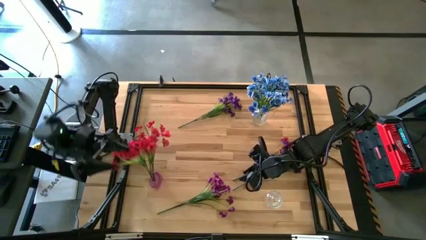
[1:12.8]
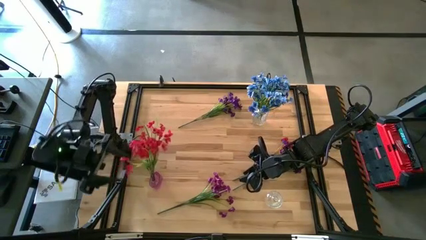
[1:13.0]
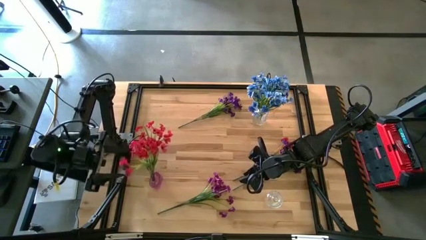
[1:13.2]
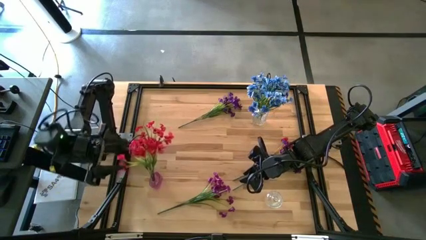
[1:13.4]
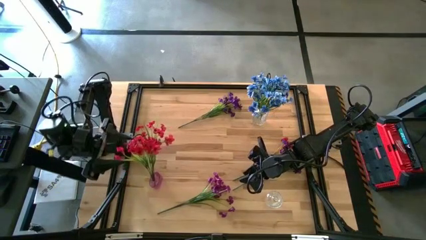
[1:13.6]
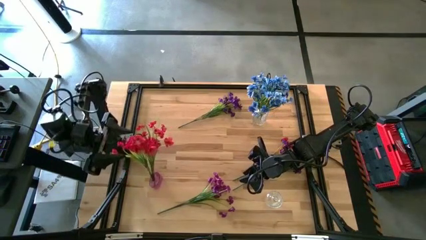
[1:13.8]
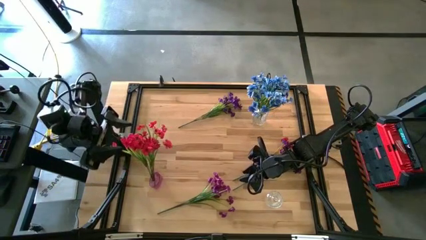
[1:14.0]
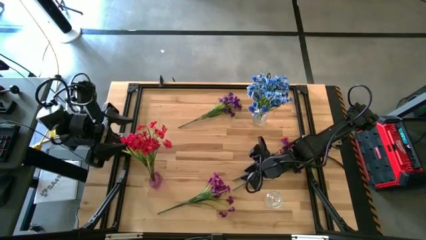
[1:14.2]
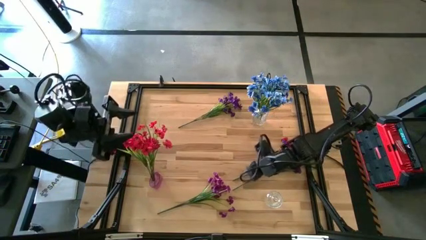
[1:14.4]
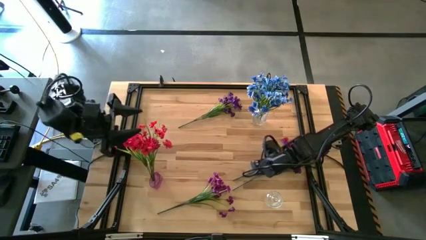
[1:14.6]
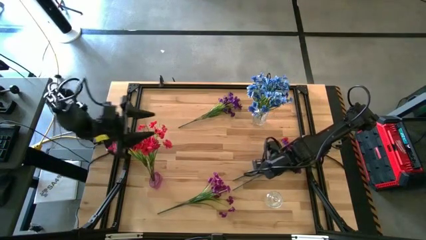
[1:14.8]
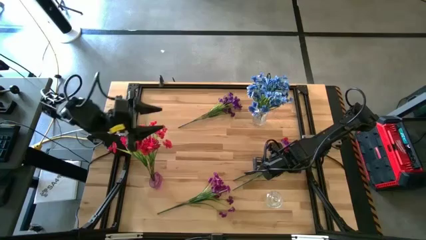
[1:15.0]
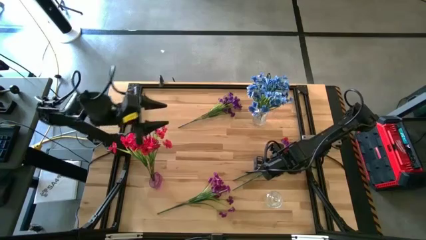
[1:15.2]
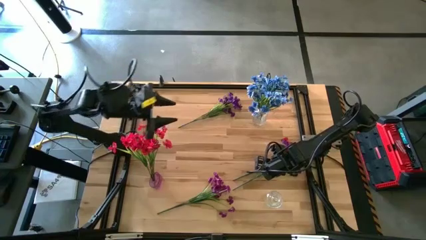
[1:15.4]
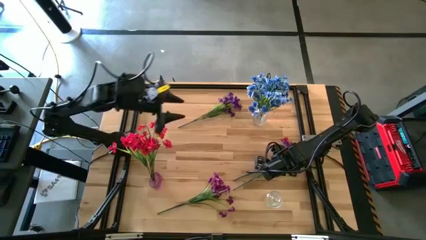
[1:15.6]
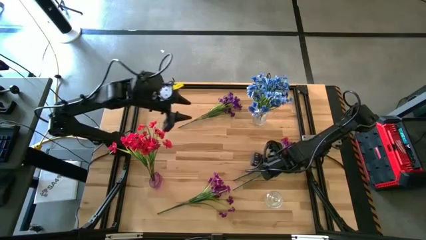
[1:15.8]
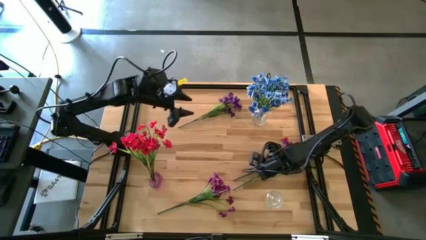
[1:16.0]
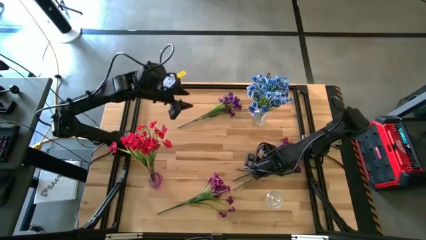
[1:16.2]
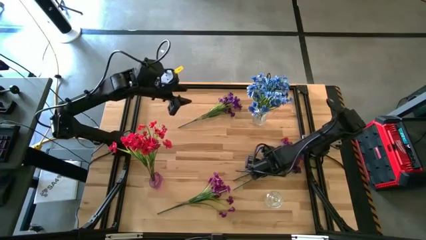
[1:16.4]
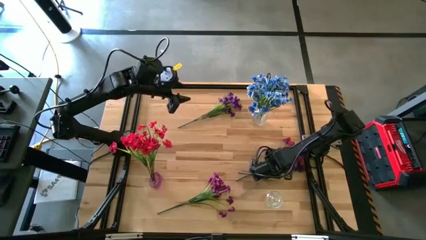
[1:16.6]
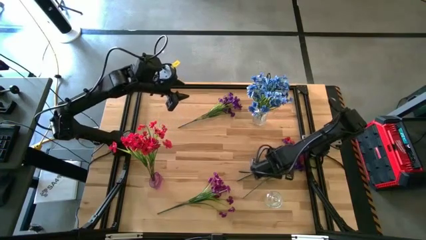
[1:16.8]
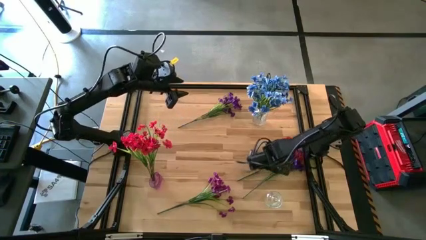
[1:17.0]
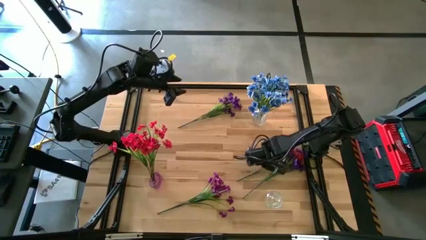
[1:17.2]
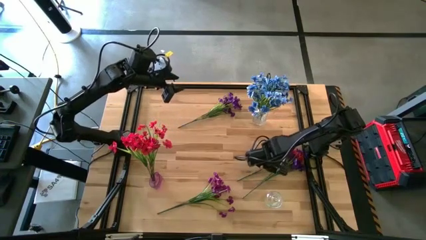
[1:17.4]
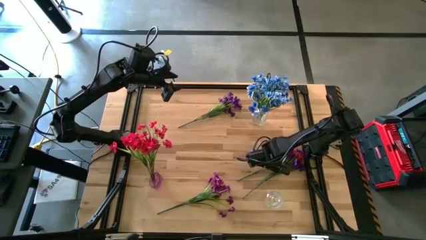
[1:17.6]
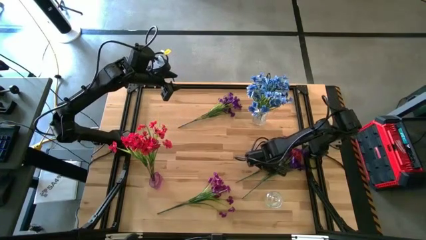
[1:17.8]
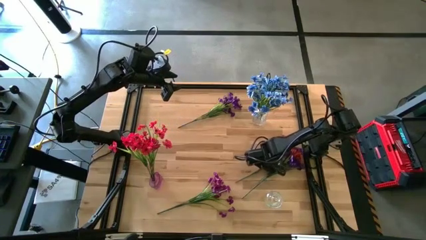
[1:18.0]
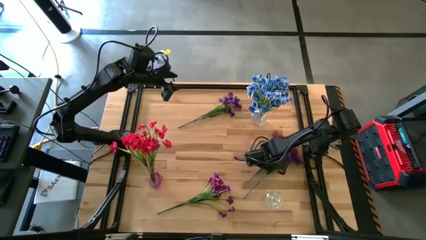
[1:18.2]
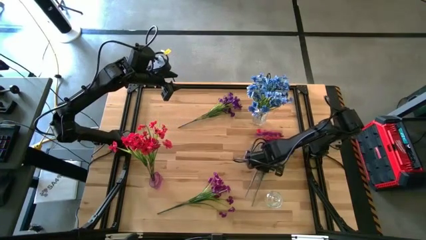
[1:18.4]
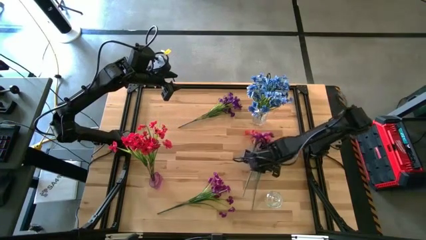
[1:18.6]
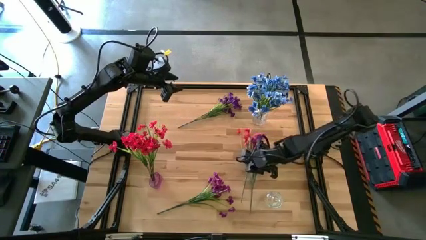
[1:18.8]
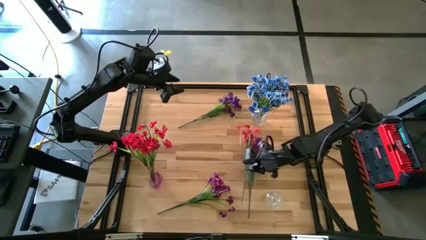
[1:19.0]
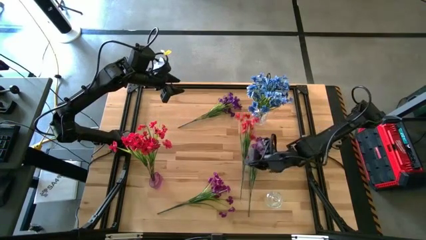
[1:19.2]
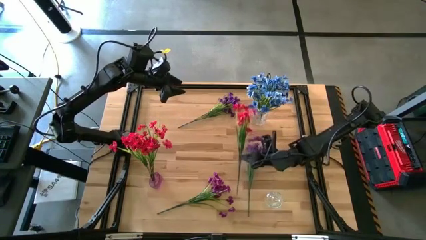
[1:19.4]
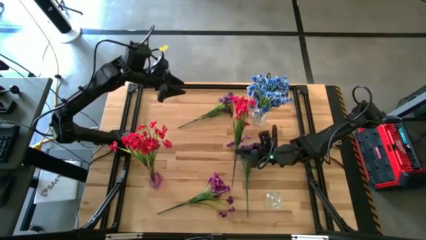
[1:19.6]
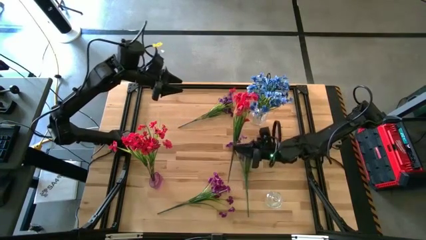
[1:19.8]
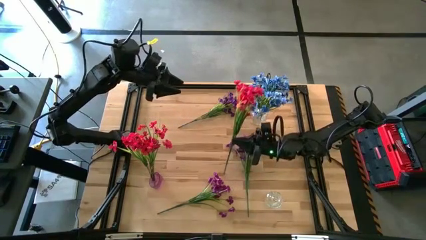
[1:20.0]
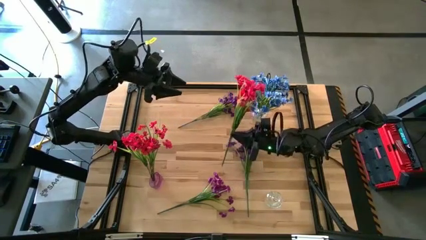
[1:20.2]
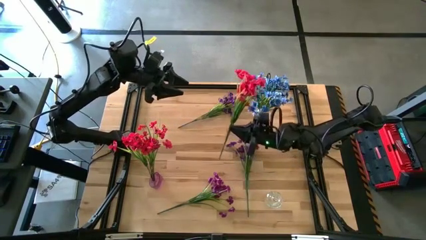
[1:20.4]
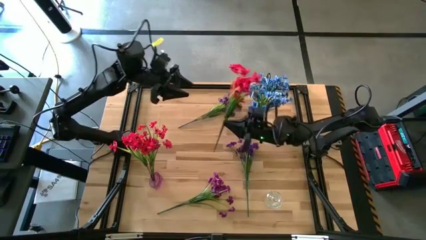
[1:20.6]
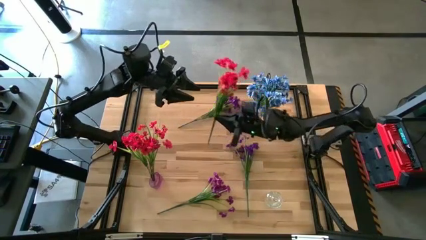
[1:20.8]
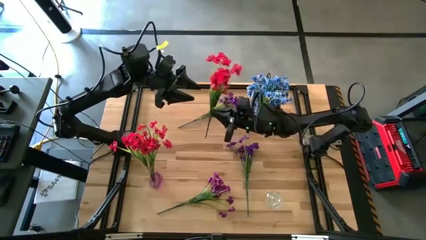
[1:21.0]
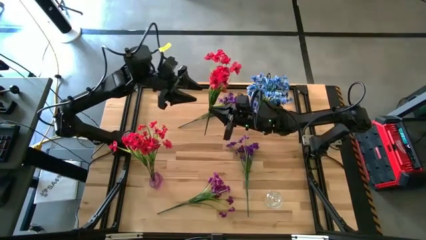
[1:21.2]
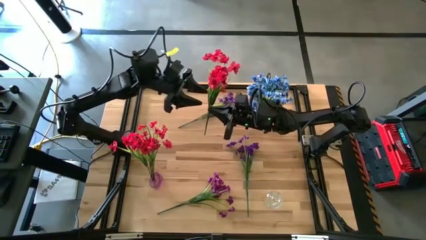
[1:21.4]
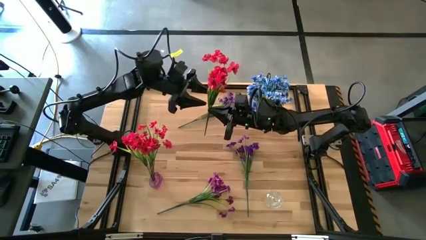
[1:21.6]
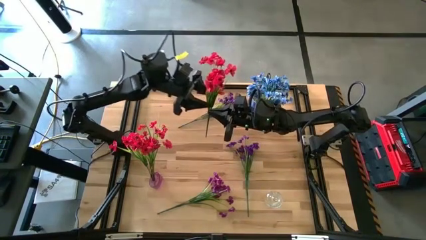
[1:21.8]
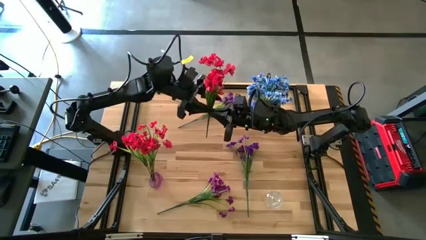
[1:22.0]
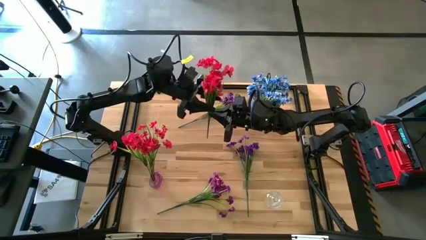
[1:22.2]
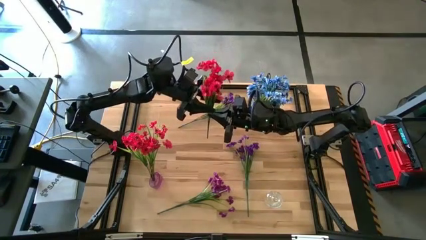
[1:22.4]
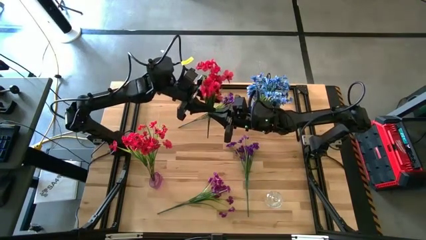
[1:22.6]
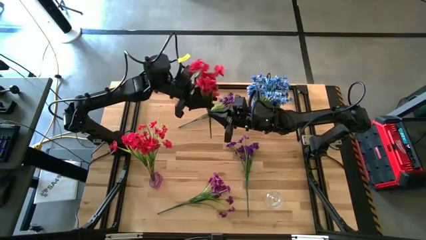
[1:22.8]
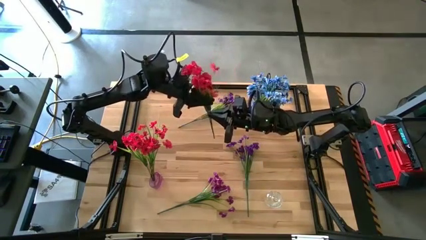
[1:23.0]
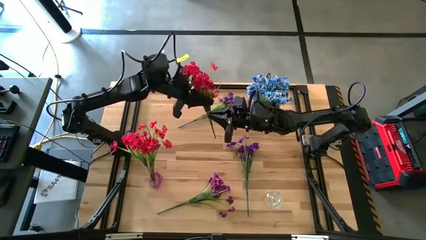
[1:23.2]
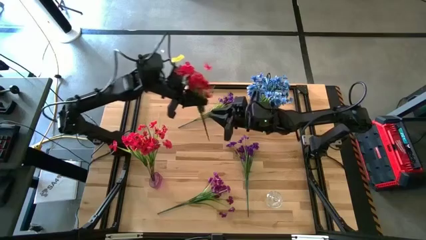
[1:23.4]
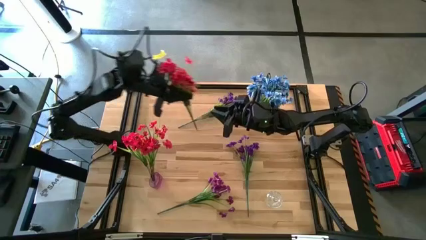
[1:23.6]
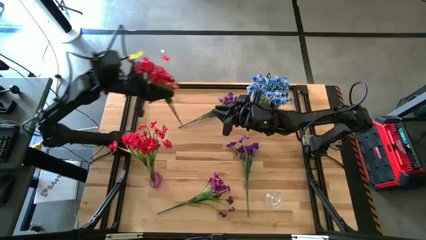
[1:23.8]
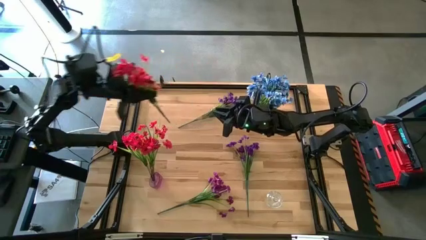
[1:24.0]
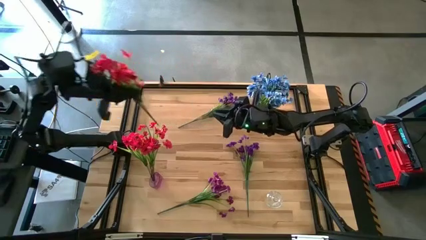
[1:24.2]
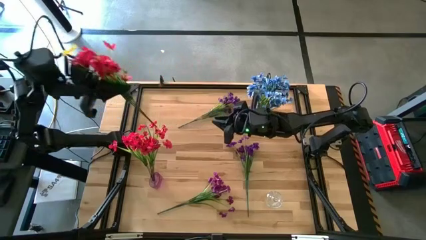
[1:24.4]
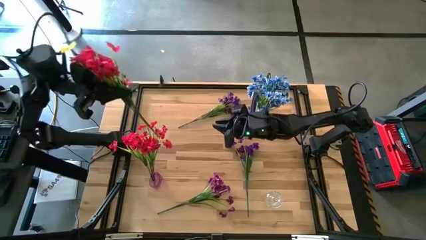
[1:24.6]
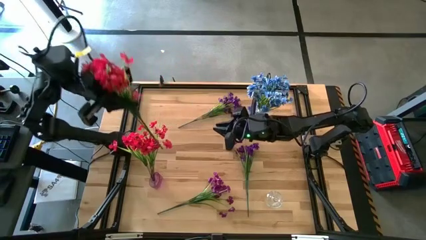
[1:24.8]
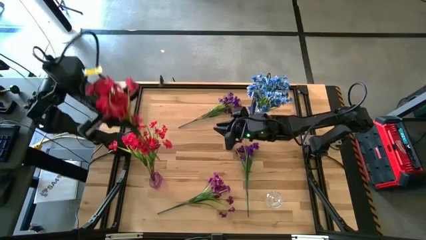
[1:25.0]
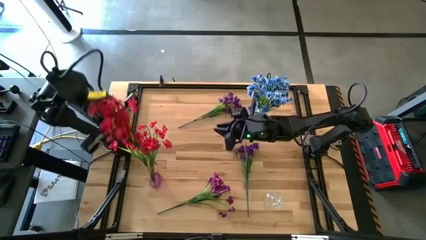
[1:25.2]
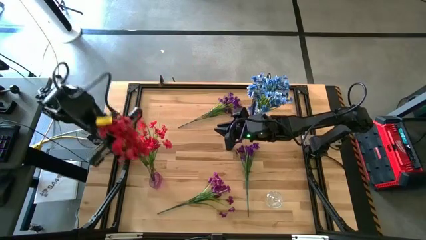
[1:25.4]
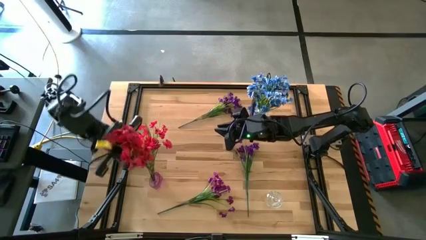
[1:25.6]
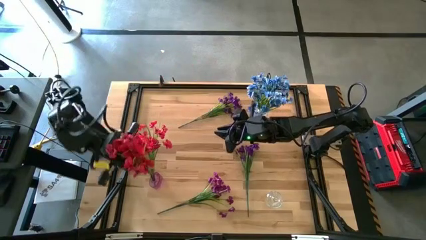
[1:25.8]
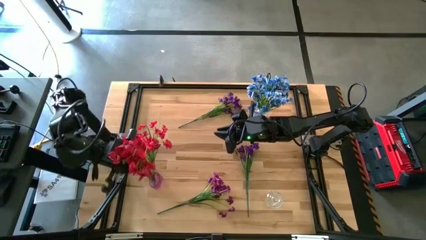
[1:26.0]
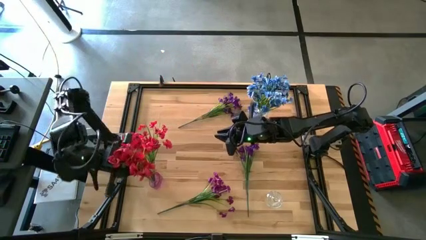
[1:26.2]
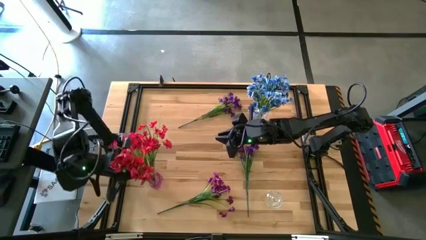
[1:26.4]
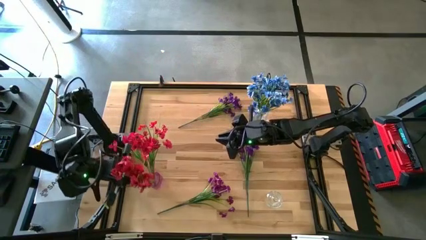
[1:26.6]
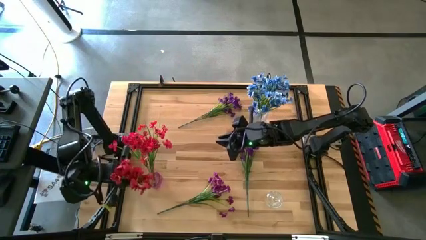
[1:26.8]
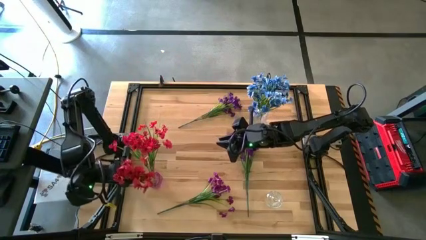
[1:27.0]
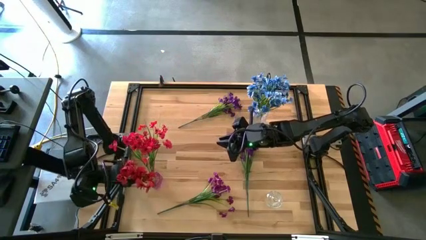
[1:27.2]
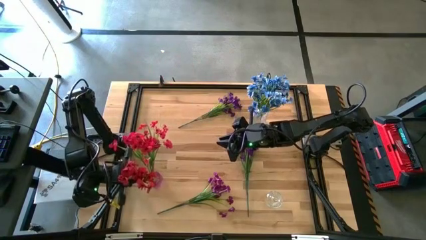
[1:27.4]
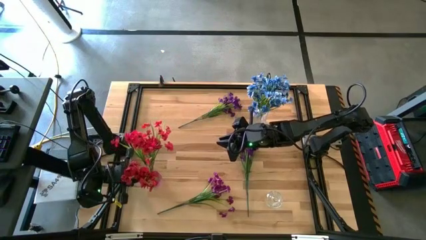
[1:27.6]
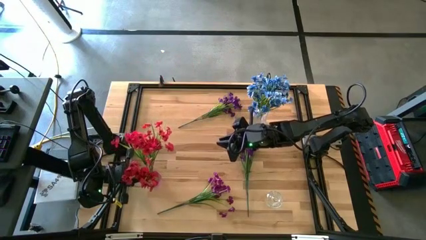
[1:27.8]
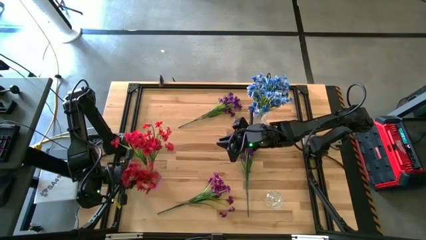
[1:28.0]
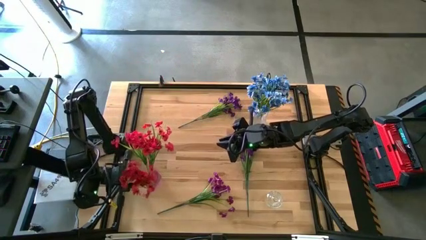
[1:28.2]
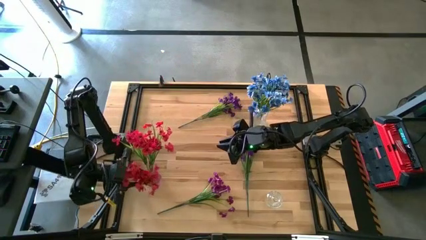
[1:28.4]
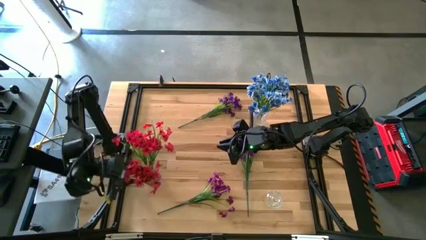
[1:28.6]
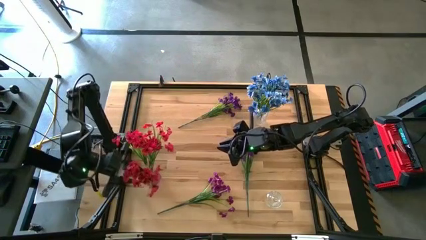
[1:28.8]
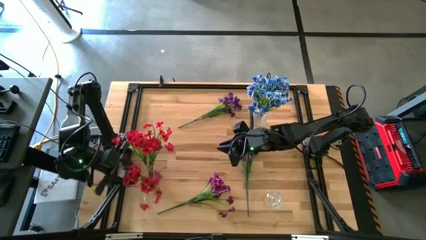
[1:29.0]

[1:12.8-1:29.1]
Task: Sort flowers into vase by color
Put the red flower into the pink flower vase
